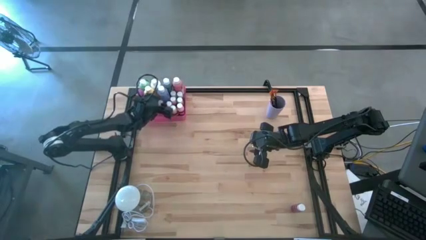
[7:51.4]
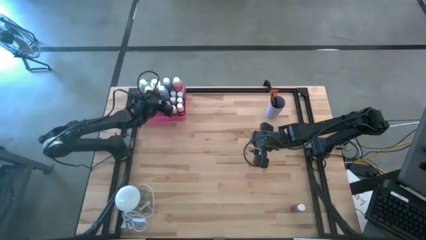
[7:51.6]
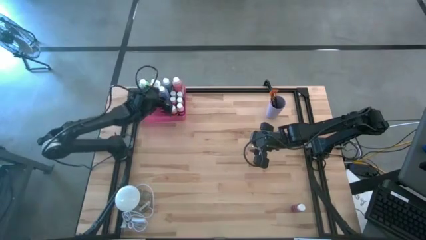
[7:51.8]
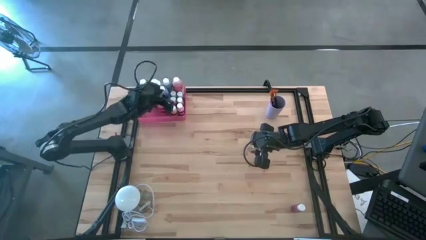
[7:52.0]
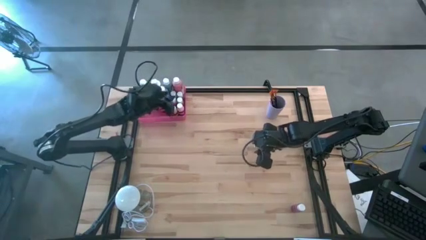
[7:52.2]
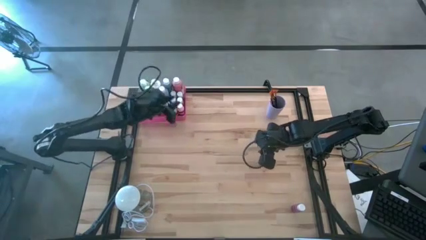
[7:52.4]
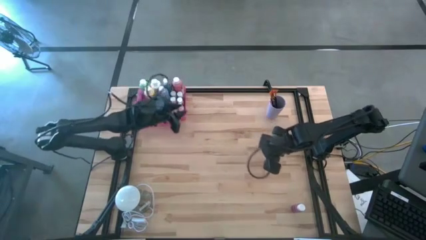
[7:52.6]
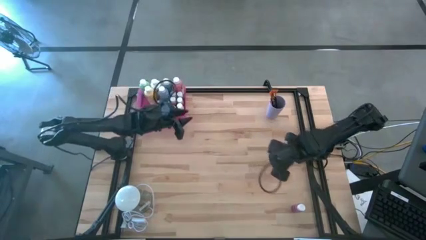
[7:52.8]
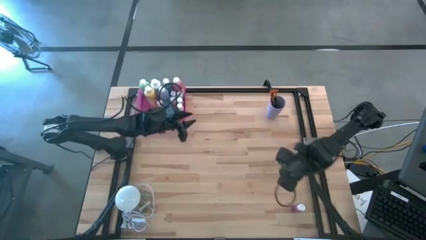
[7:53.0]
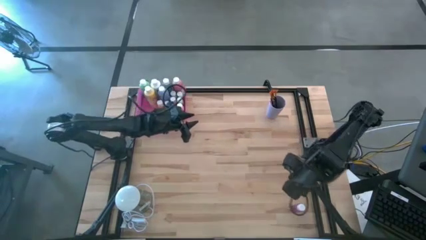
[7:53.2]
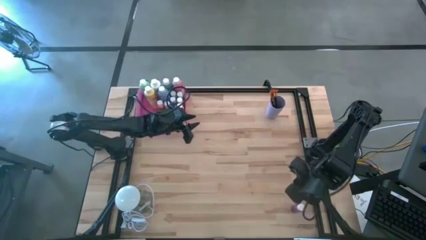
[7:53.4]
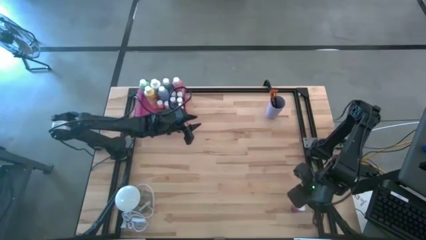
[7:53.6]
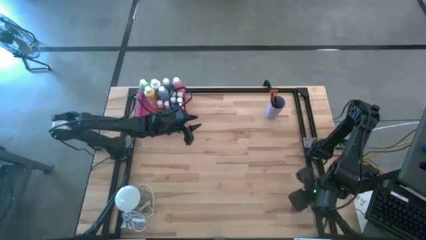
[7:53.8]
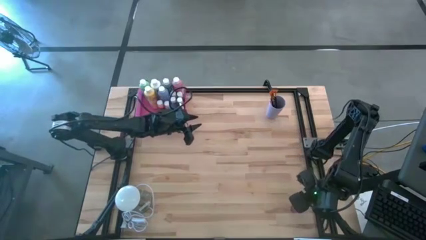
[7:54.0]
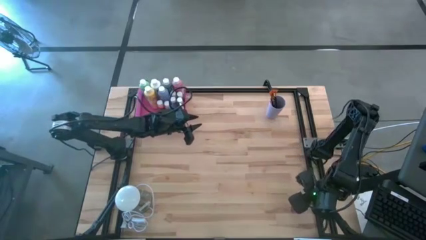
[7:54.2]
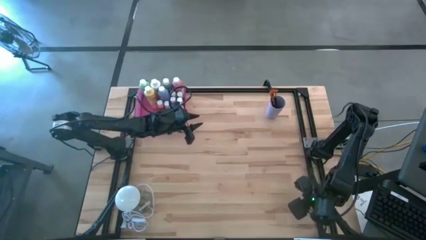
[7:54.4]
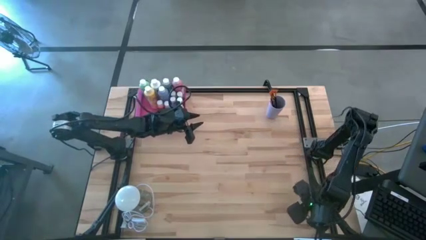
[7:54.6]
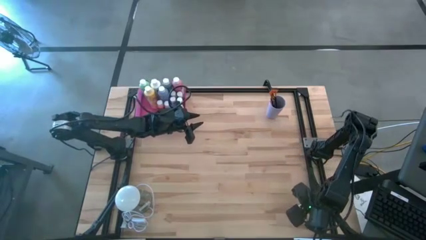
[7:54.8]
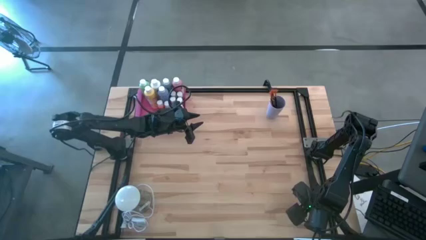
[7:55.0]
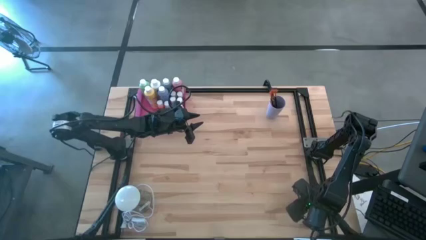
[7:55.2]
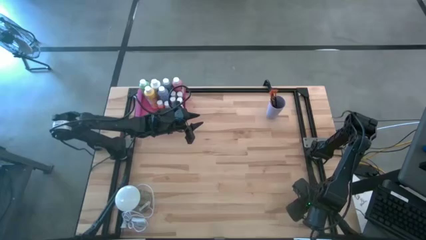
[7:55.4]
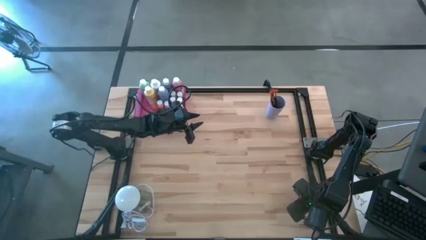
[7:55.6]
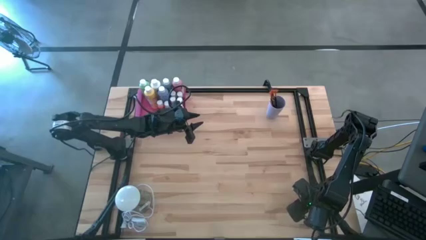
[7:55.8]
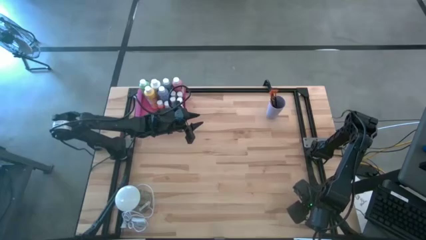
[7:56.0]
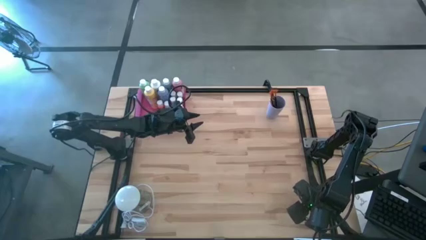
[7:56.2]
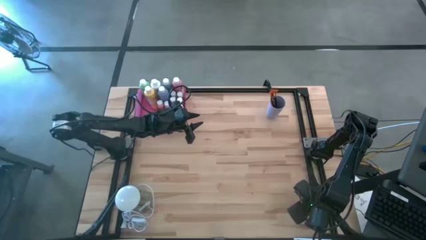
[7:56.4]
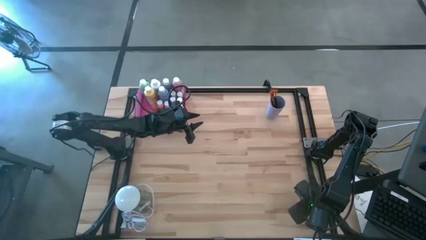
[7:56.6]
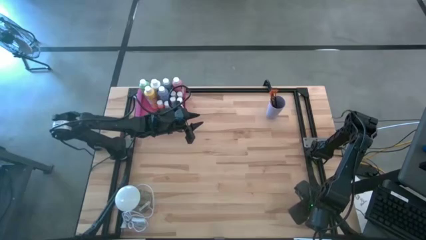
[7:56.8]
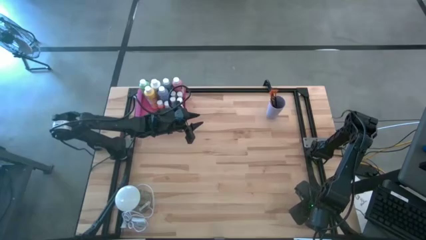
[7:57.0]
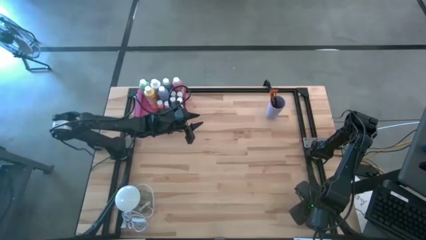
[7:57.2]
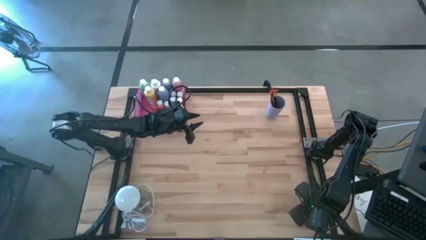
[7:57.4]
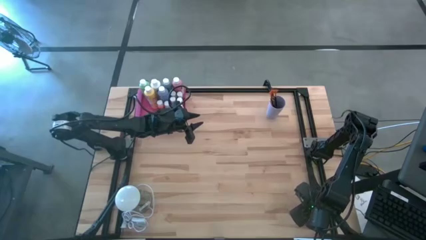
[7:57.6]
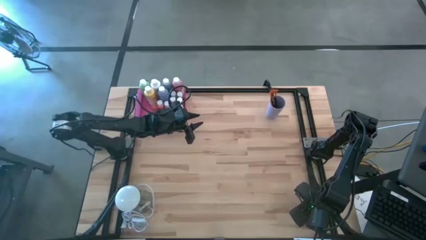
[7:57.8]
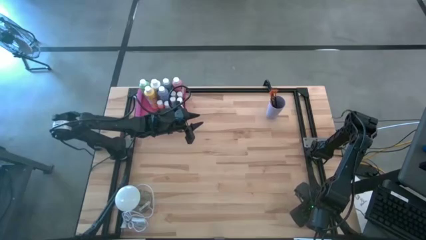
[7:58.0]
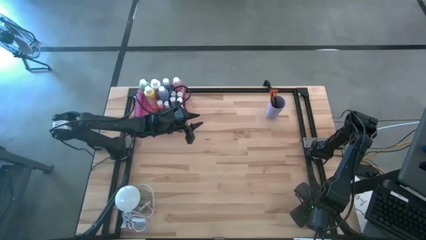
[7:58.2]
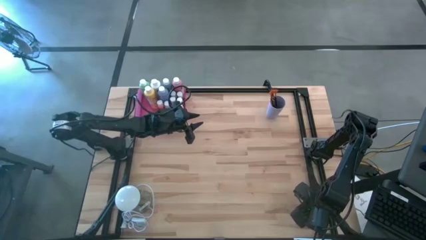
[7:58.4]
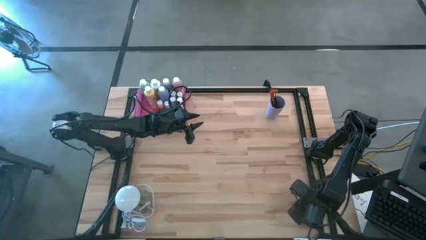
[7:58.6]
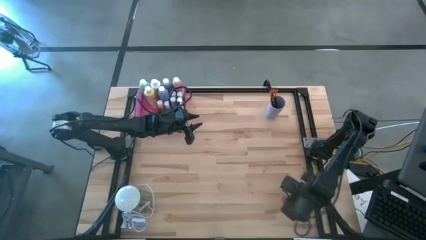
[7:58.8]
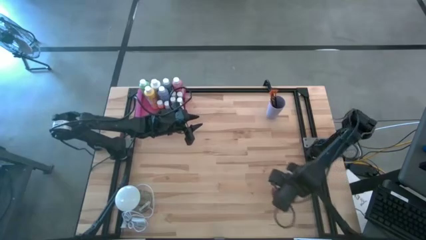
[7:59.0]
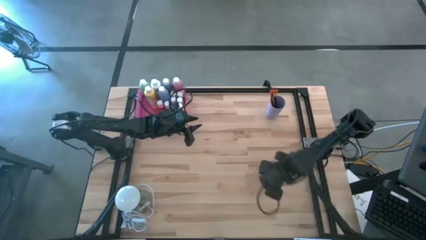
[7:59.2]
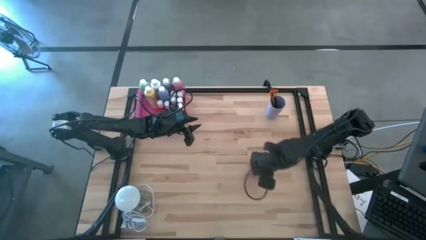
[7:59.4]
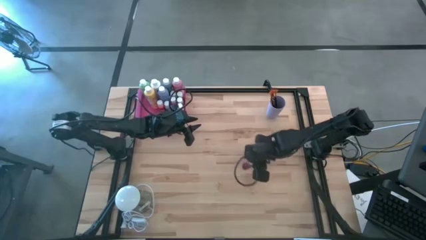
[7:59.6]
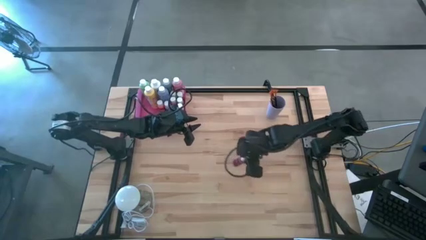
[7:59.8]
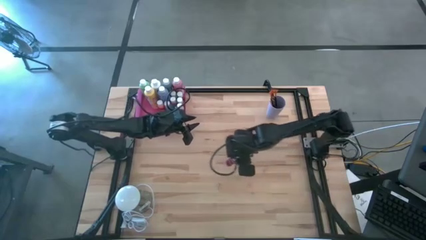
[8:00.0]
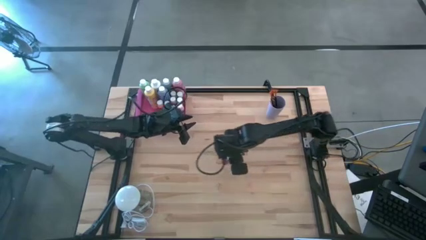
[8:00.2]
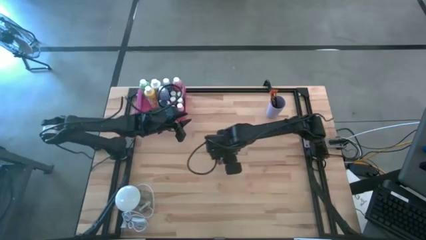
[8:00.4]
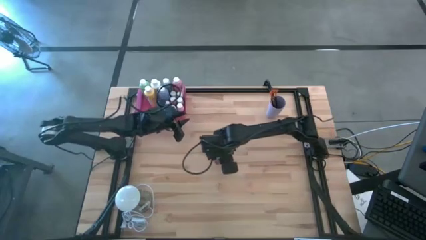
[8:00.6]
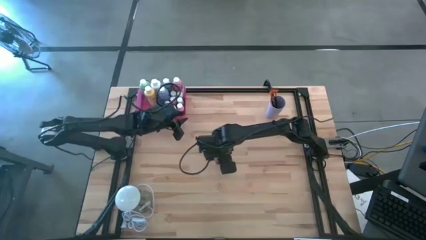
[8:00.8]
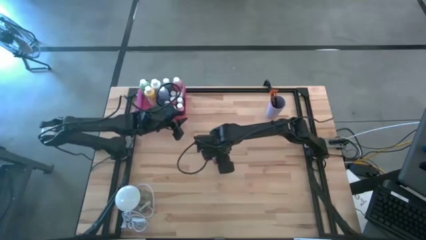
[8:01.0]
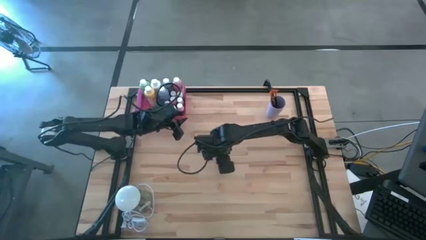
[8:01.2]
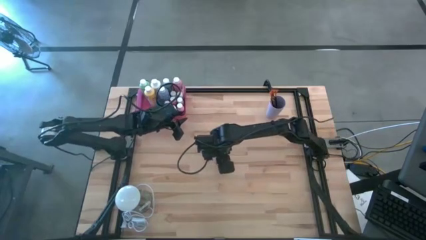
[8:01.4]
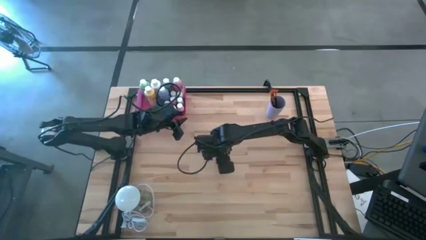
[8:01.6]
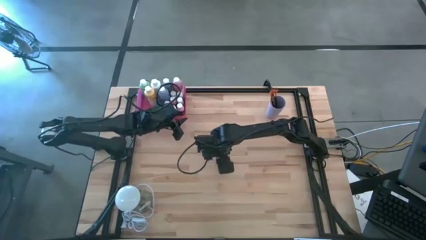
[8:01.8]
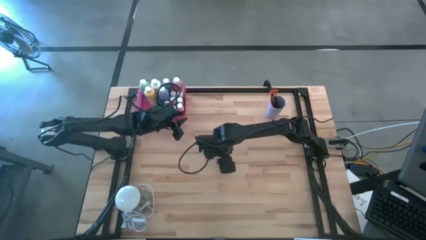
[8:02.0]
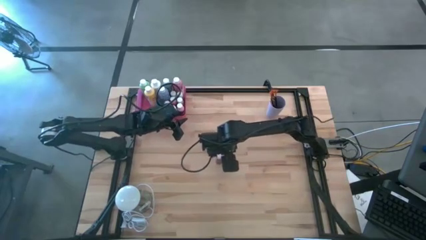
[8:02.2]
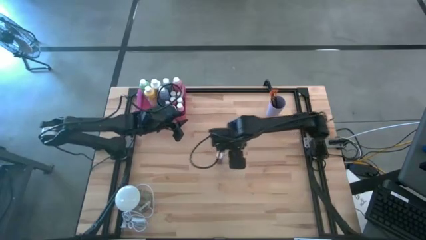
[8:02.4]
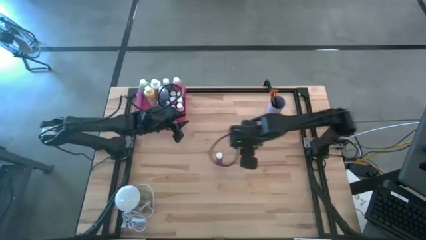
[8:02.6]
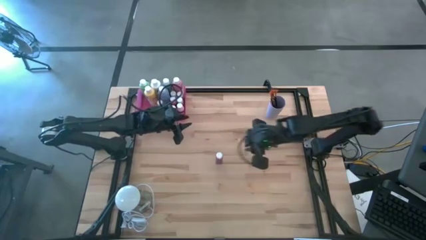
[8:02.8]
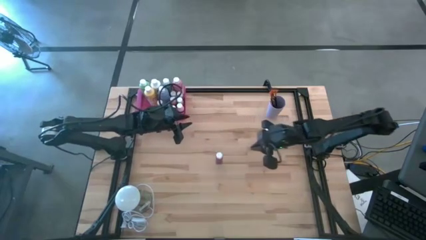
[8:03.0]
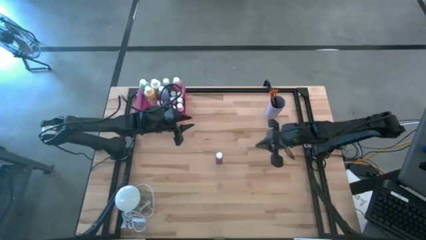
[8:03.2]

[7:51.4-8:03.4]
Task: Pick & Place Paint Supplies
Put the small pink paint bottle into the pink bin
